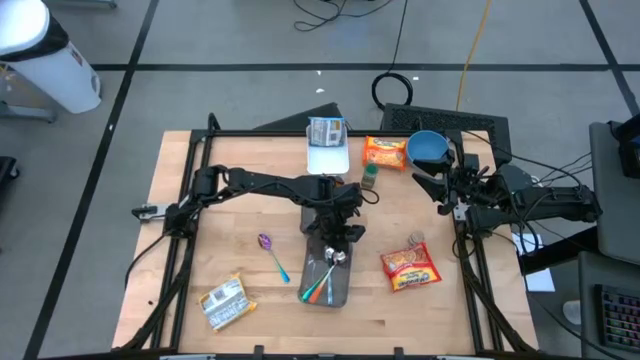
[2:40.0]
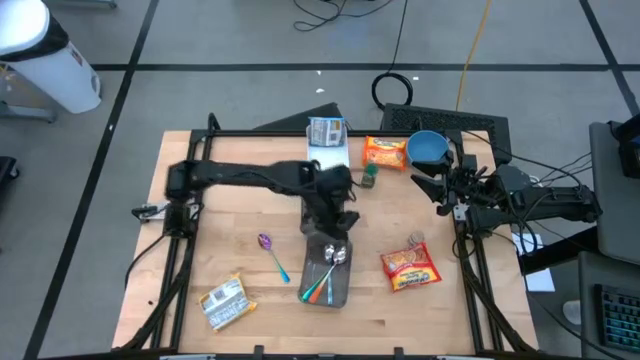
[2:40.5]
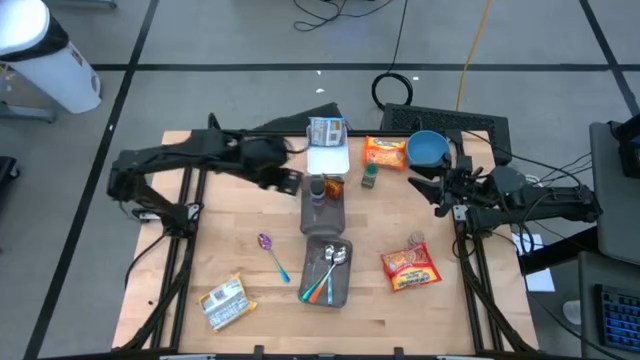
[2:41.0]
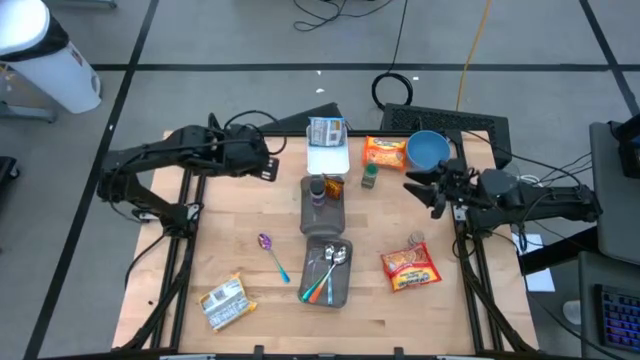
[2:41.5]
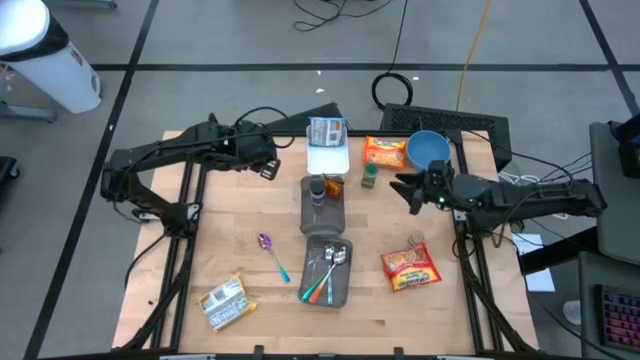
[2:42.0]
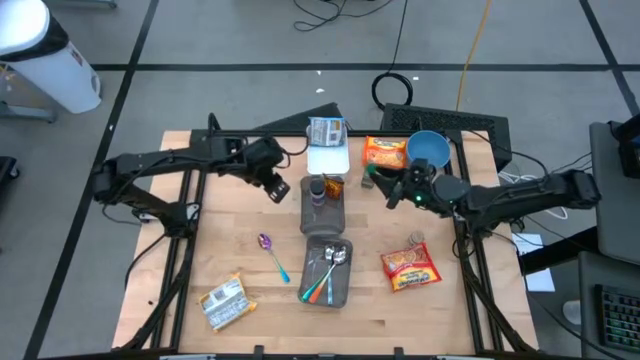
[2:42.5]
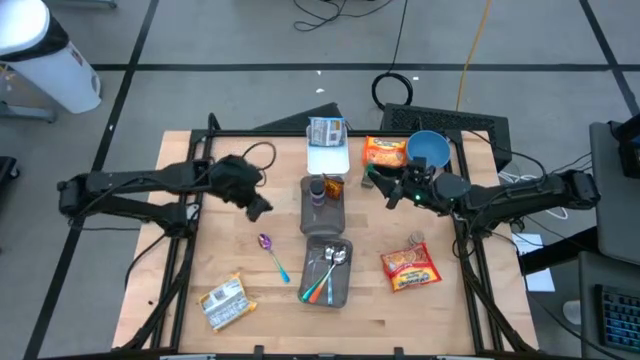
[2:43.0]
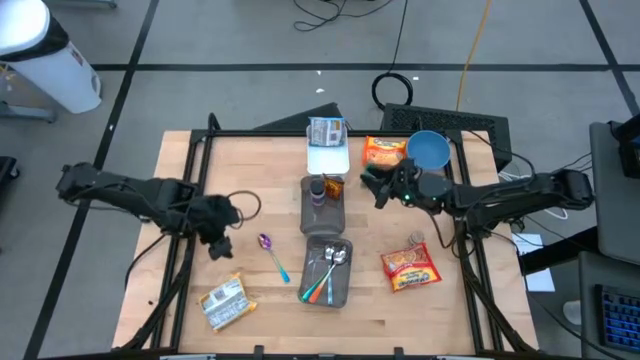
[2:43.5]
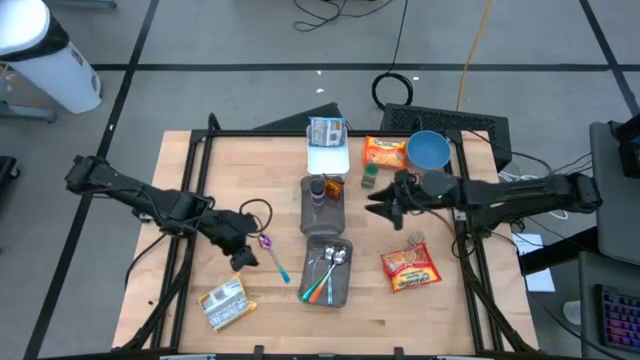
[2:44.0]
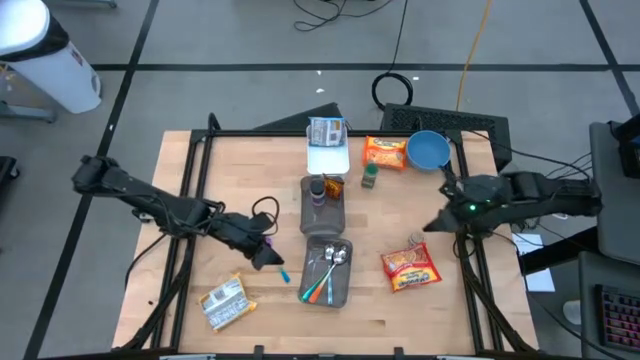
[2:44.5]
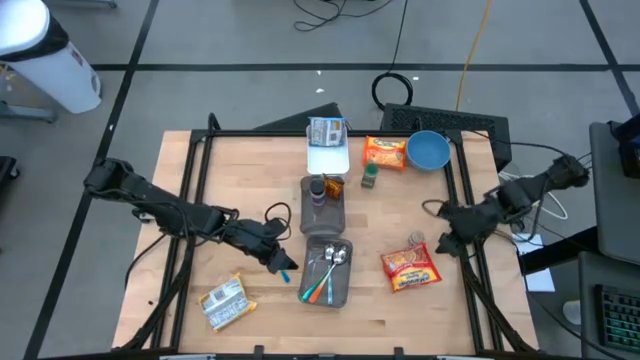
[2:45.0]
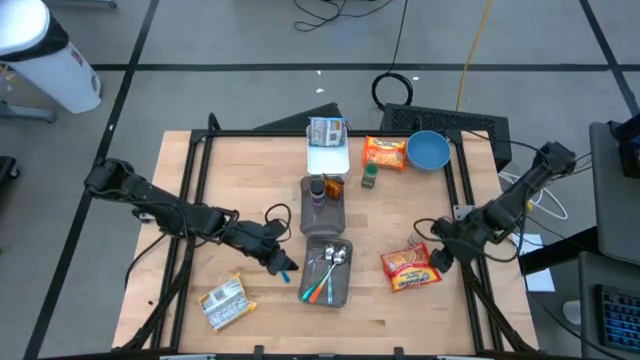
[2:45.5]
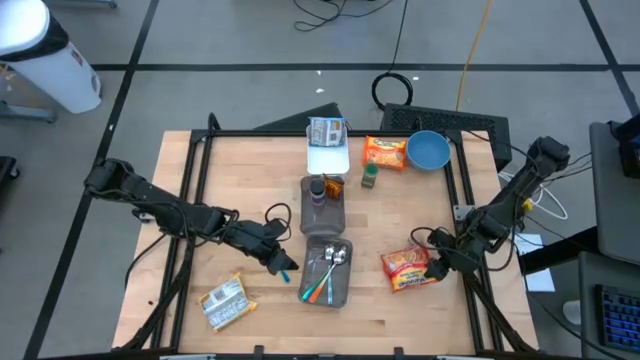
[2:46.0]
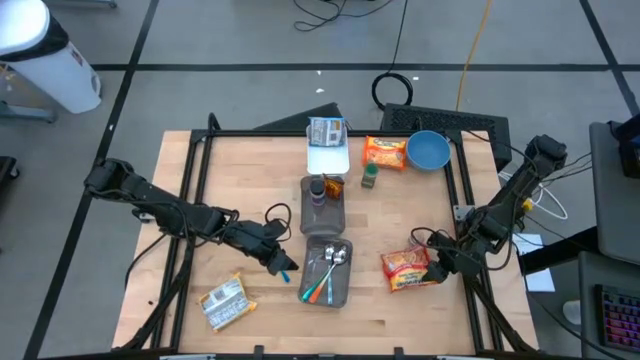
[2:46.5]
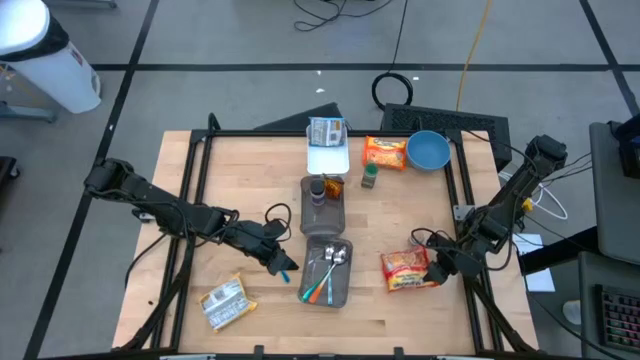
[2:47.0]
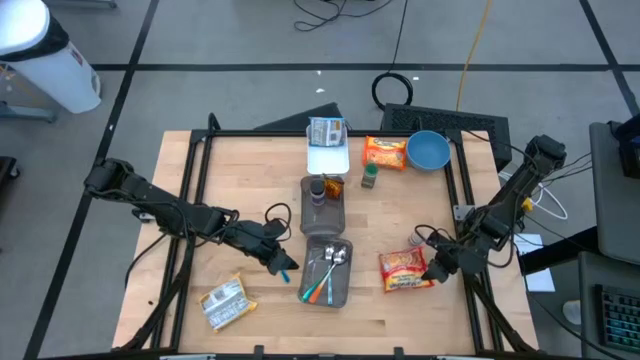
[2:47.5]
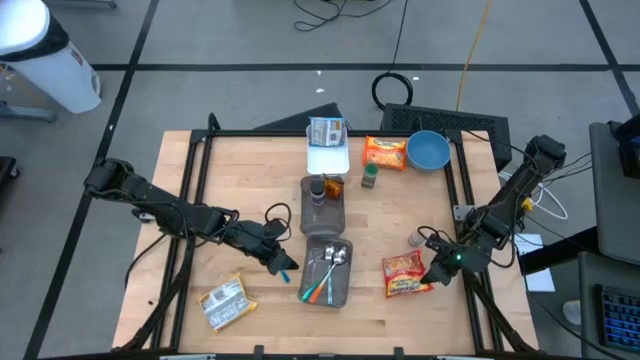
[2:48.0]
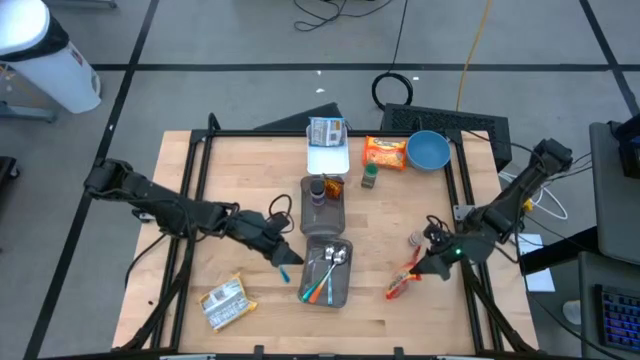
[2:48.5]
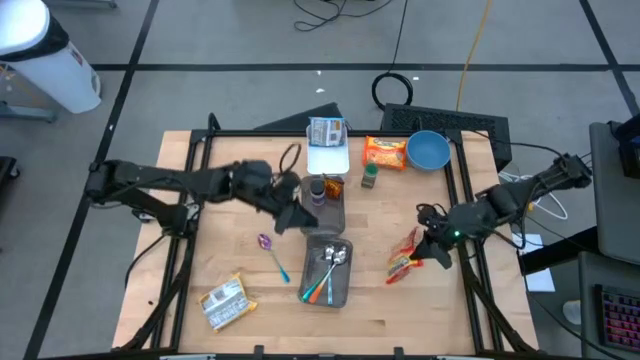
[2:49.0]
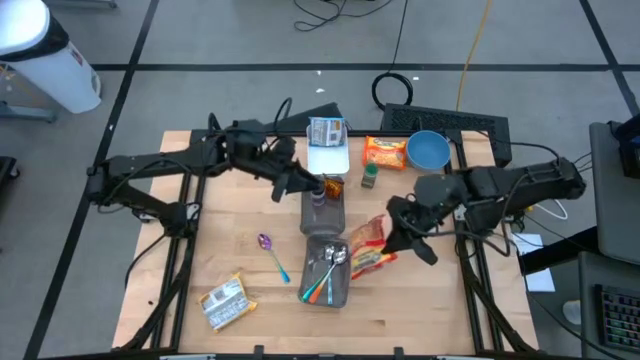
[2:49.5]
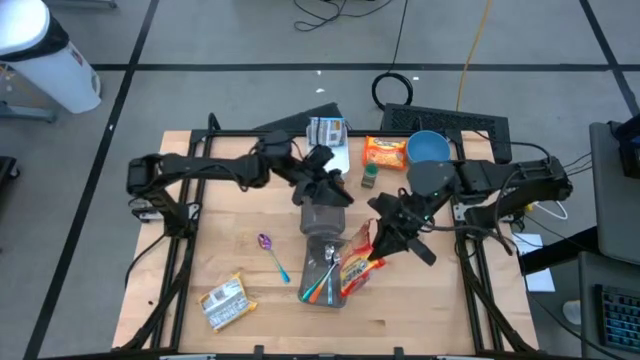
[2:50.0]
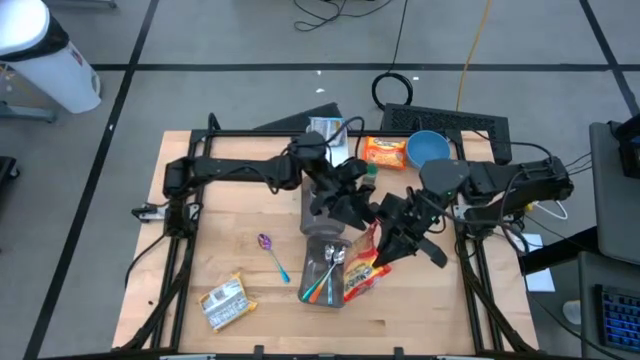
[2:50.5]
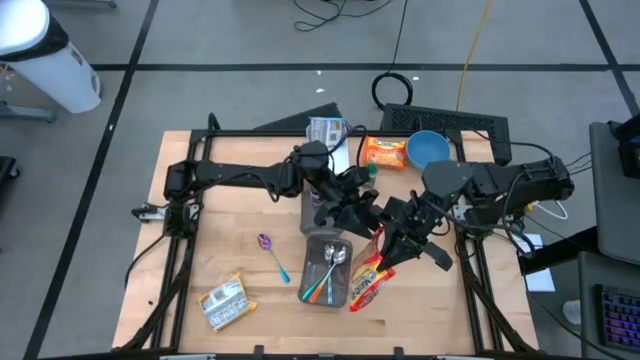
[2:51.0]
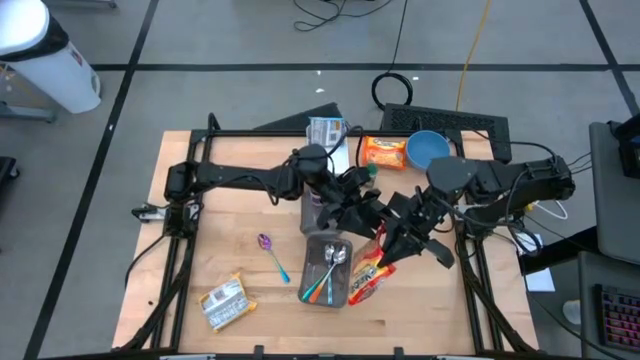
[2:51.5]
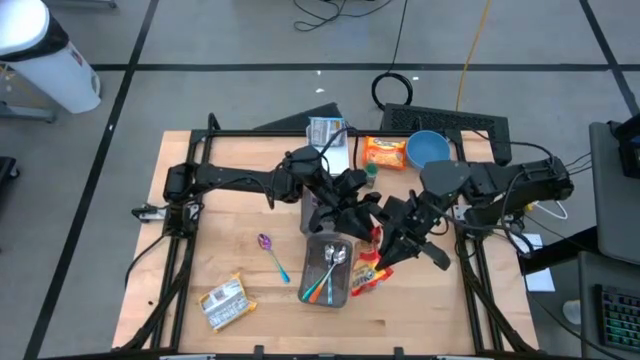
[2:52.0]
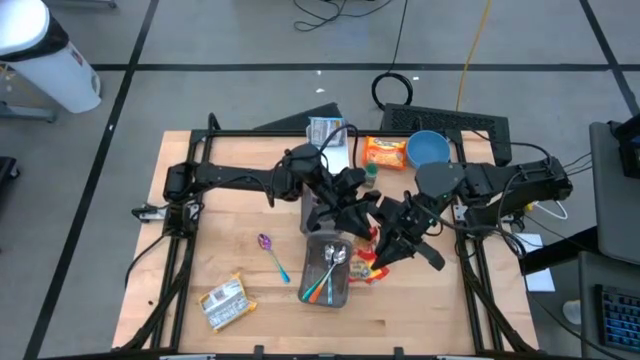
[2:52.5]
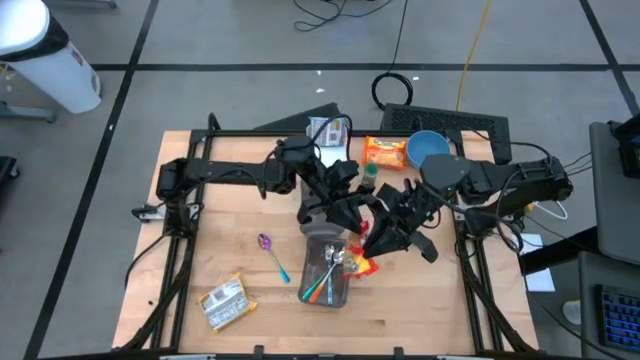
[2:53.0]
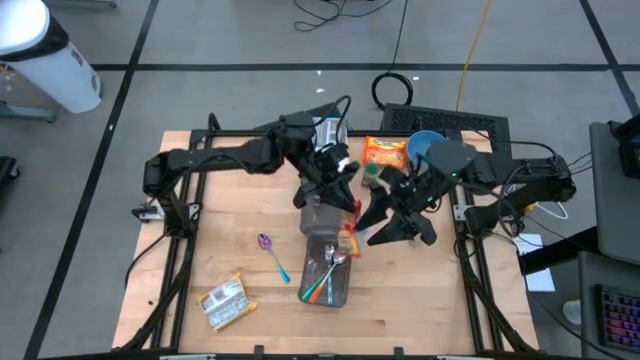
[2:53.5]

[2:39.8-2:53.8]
Task: Pick & Place Food Item
Put the red noodle pack into the white bin

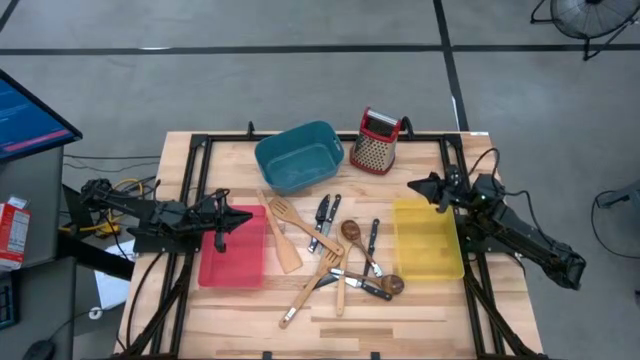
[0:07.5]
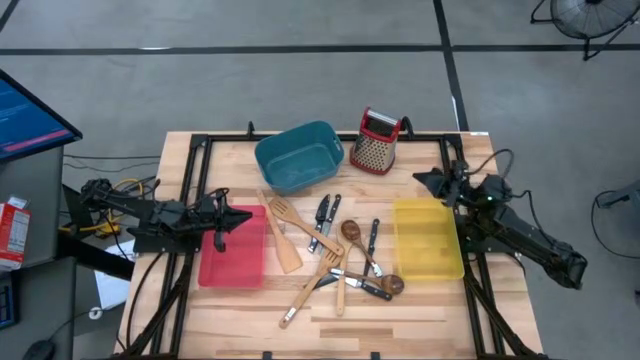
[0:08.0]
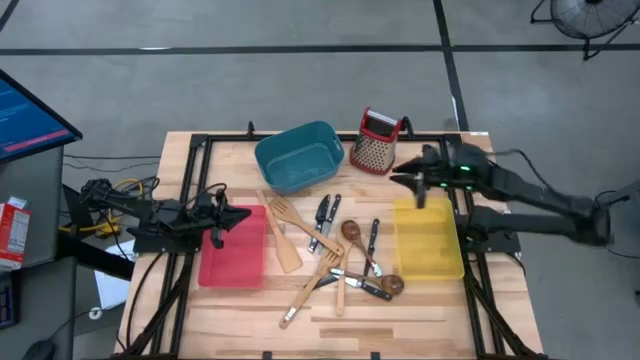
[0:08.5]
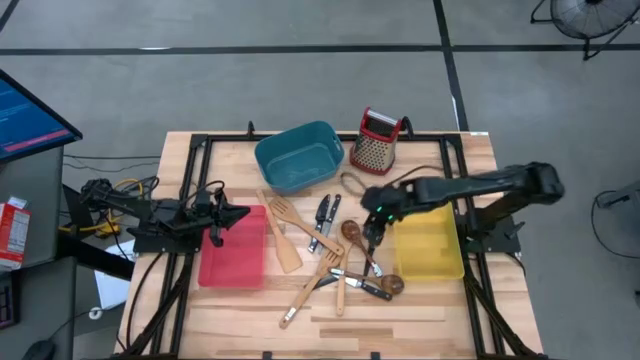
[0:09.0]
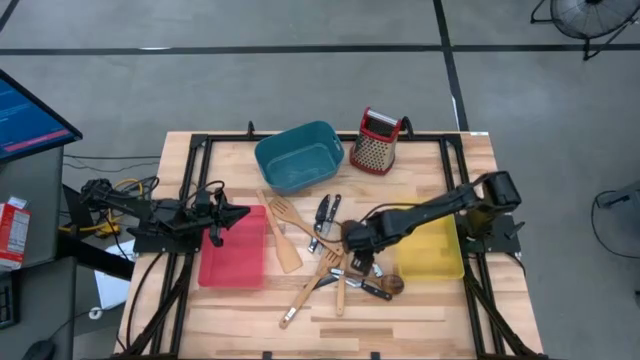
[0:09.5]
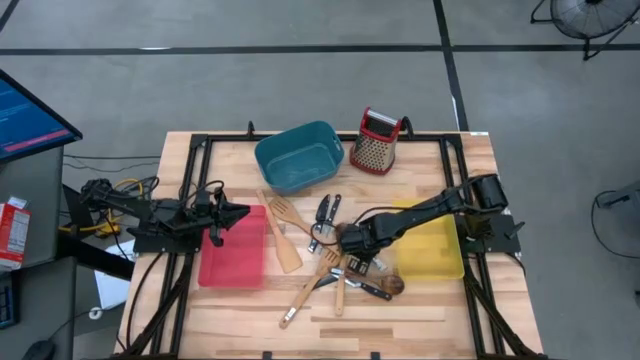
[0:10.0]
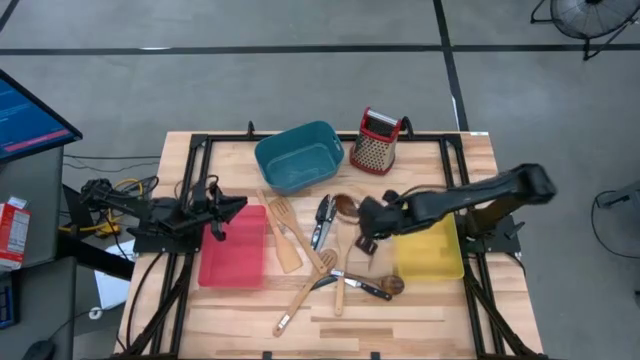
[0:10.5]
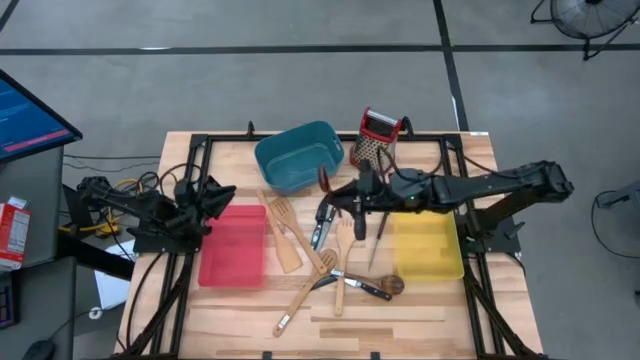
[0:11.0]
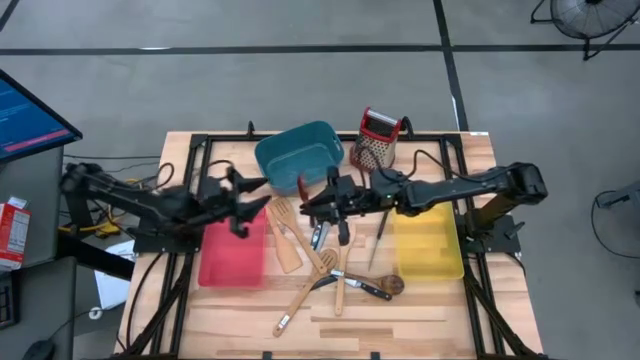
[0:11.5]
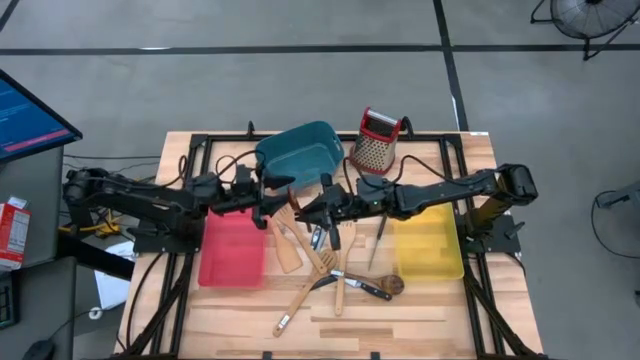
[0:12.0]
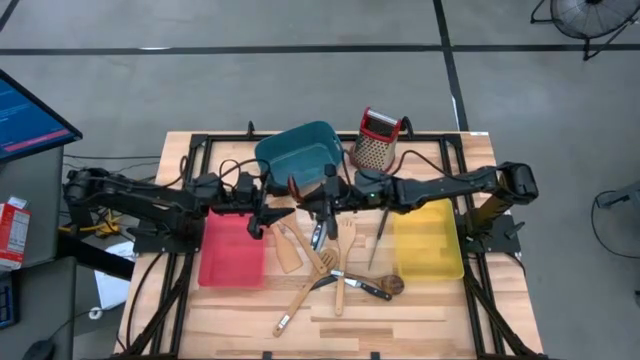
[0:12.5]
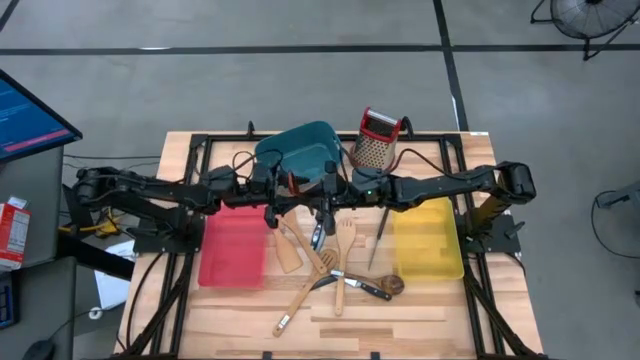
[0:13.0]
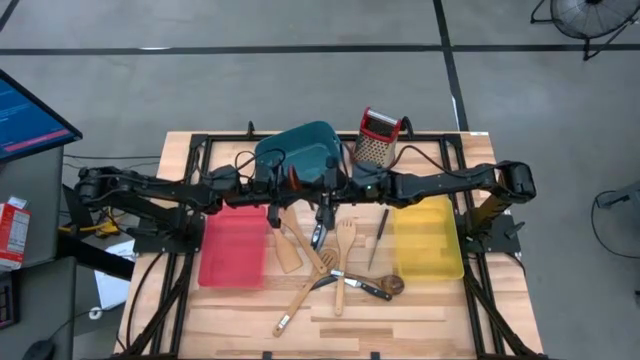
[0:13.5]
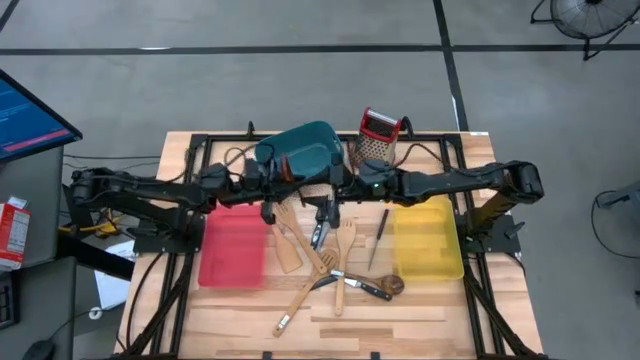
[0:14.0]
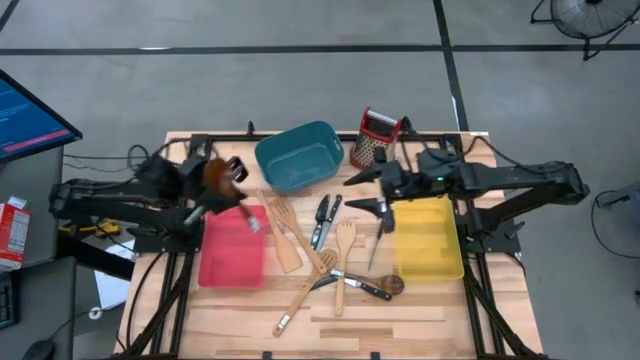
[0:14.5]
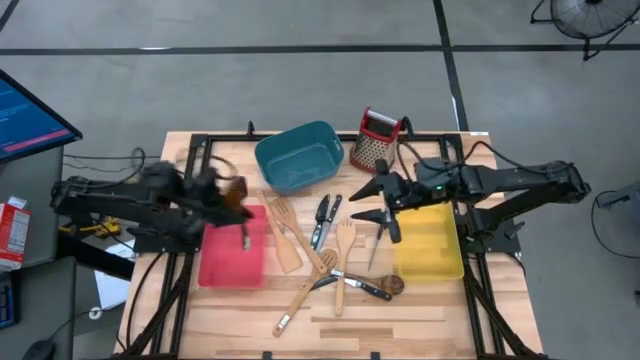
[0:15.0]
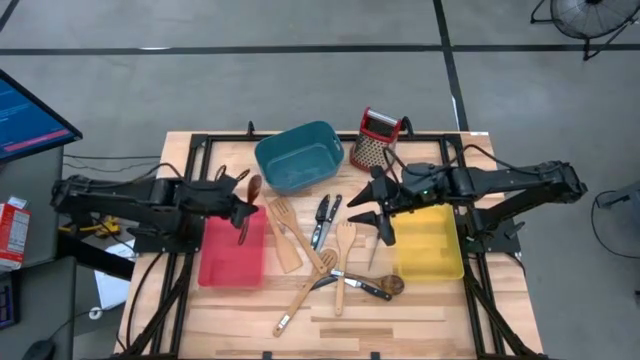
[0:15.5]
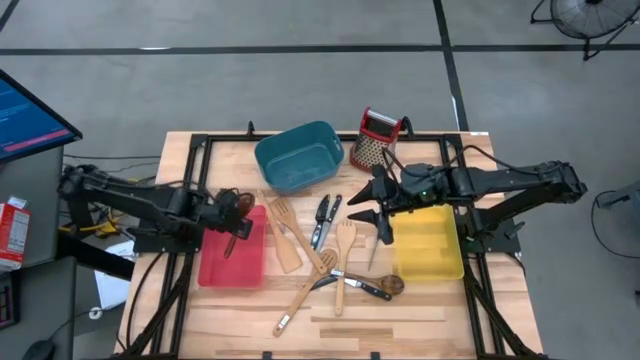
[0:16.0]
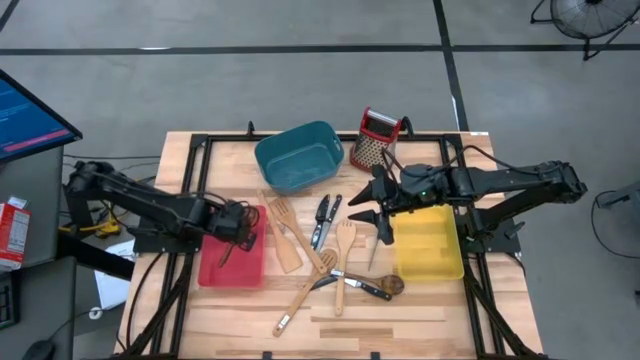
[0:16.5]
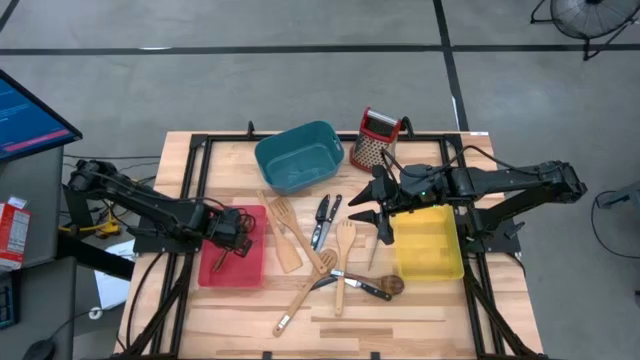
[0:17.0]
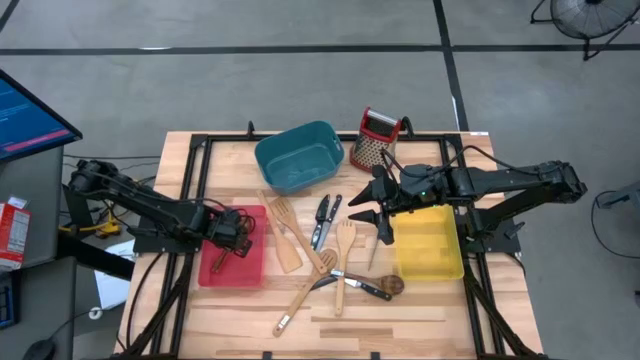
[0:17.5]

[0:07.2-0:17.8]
Task: Pick & Place Kitchen Items
Put the dark brown spoon into the pink bin
